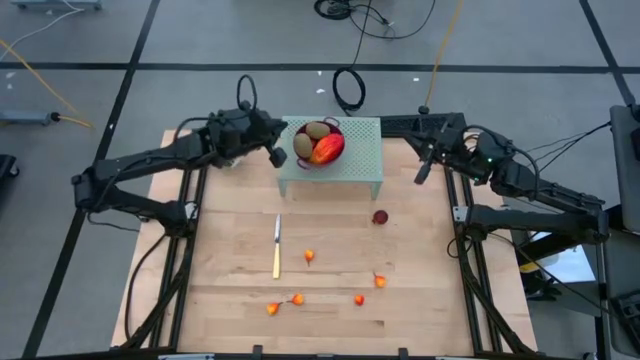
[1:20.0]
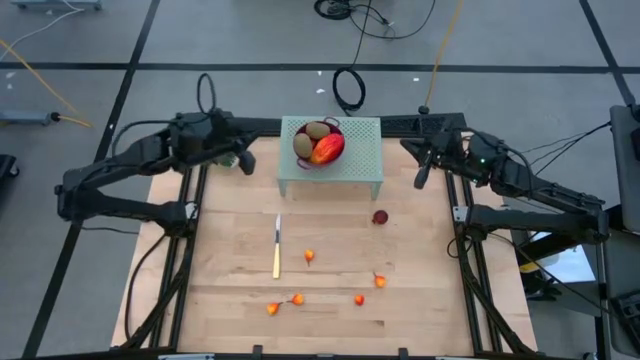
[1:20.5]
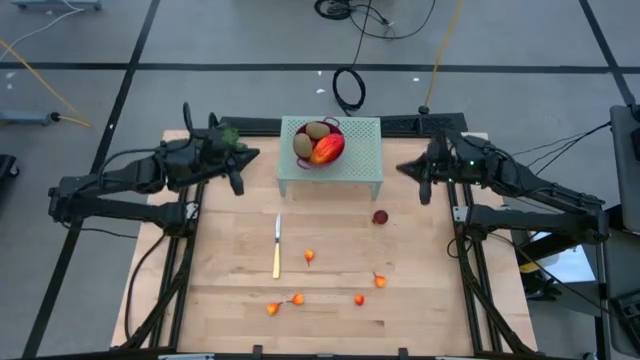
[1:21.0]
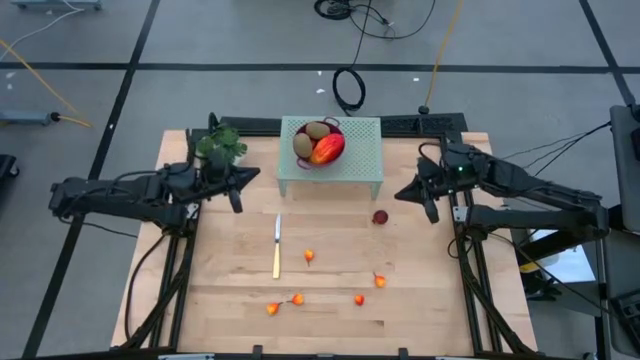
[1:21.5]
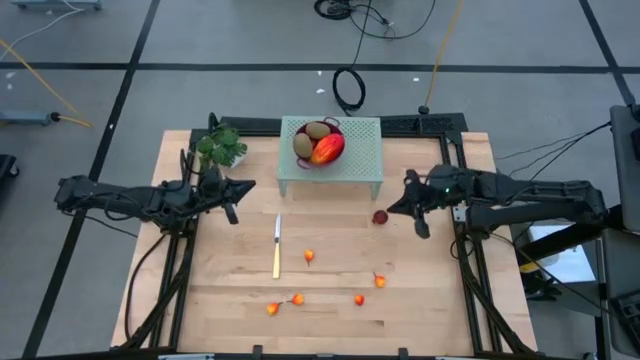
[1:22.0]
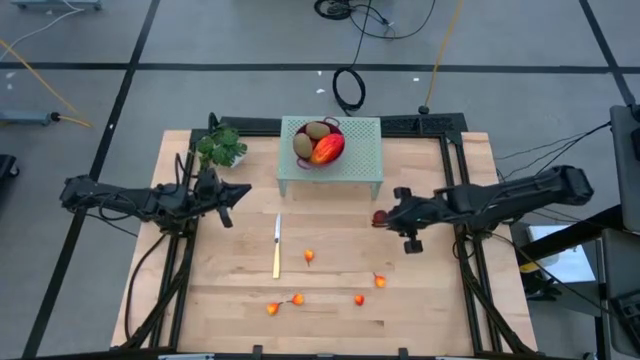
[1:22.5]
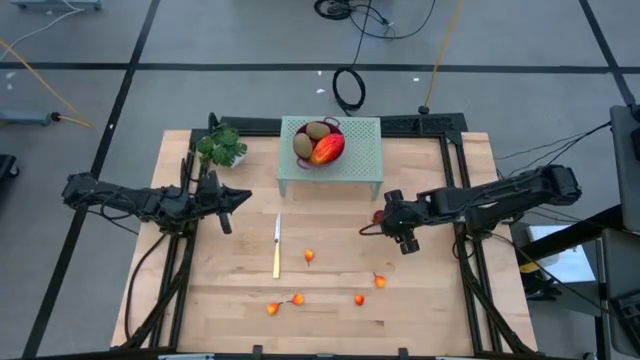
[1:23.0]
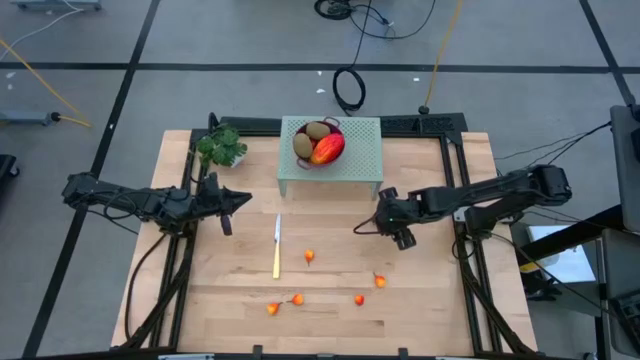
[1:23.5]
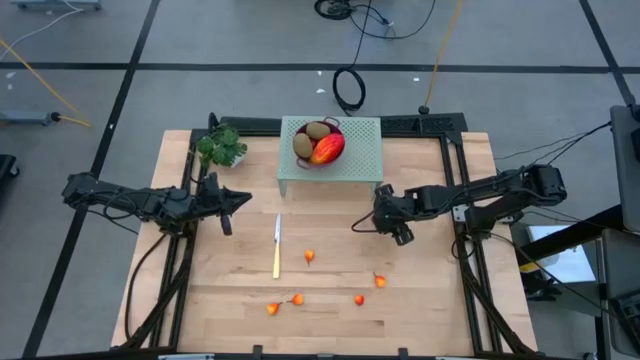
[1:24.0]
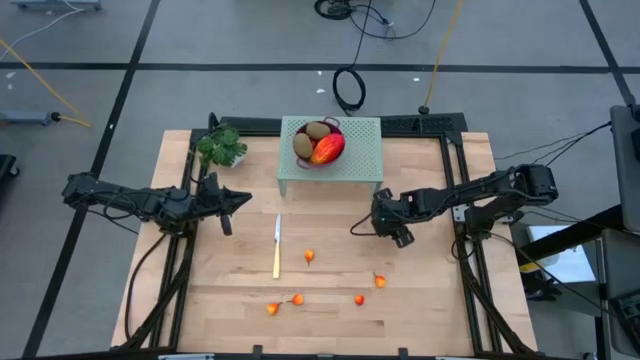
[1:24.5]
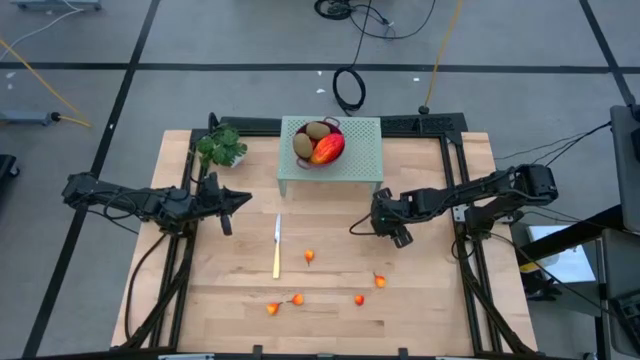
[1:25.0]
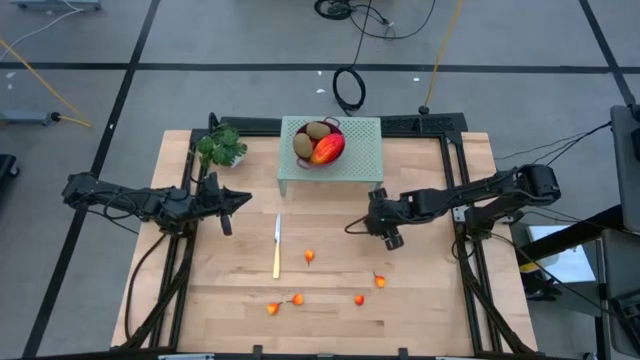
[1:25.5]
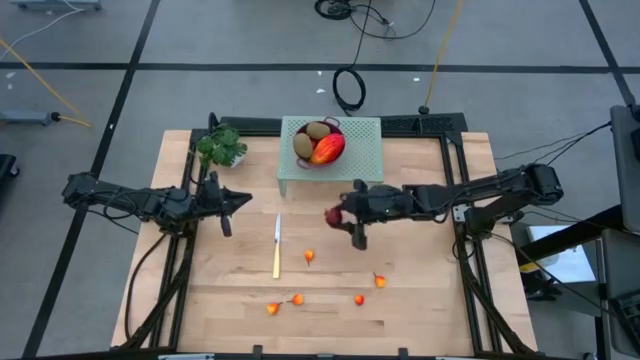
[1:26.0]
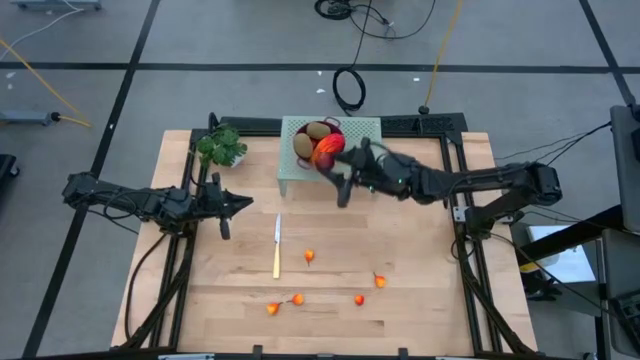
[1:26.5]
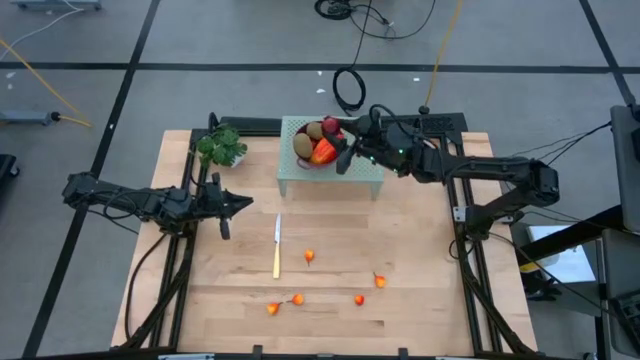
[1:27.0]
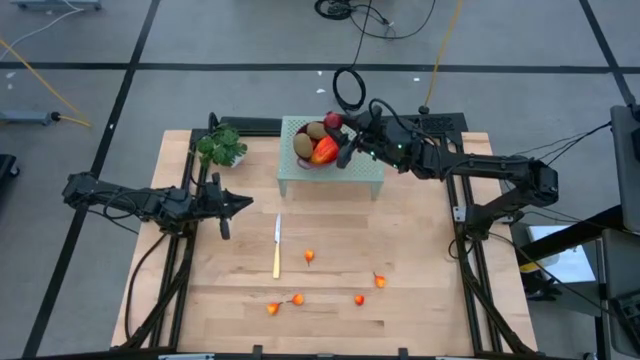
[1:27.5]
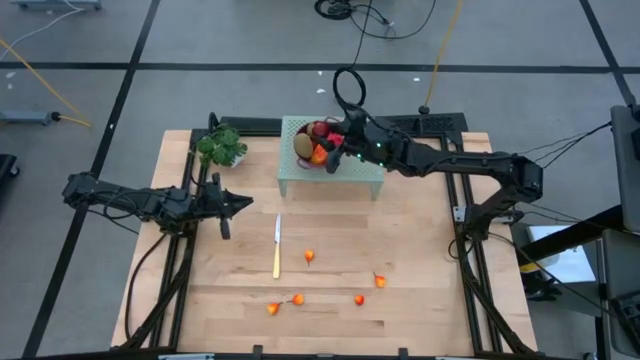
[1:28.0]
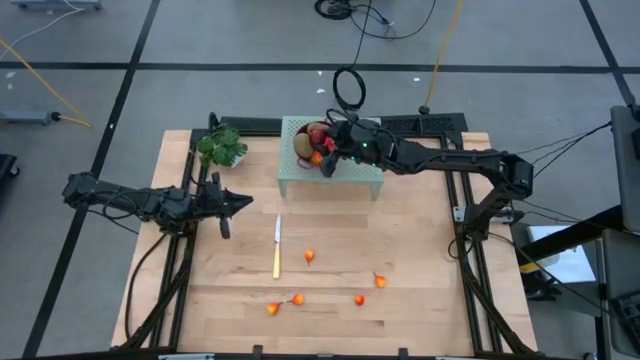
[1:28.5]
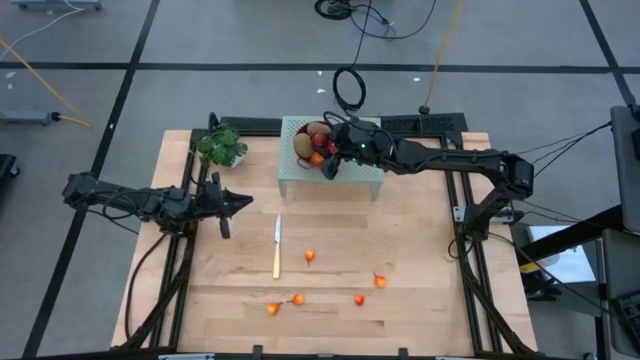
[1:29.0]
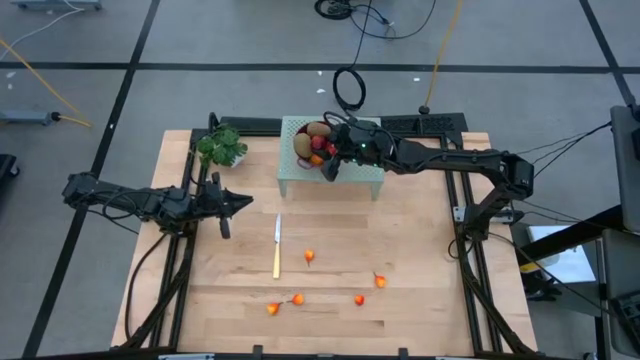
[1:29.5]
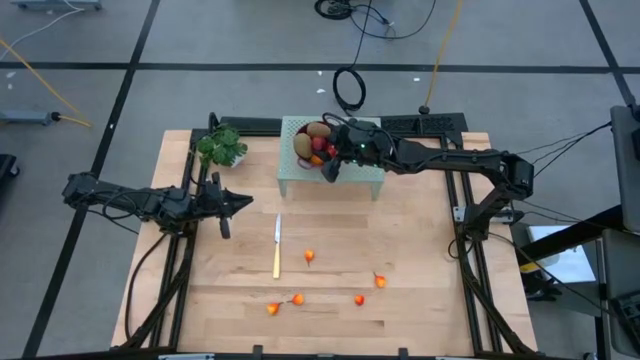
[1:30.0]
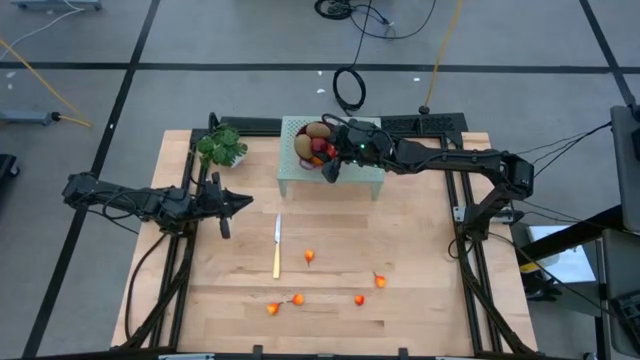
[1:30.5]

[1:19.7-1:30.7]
Task: Pick & Place Fruit
Put the pomegranate into the strainer bowl on the shelf

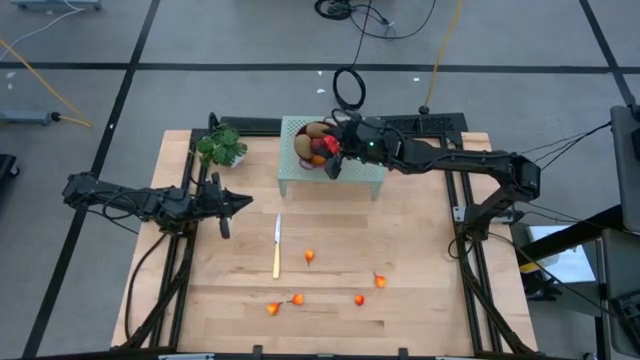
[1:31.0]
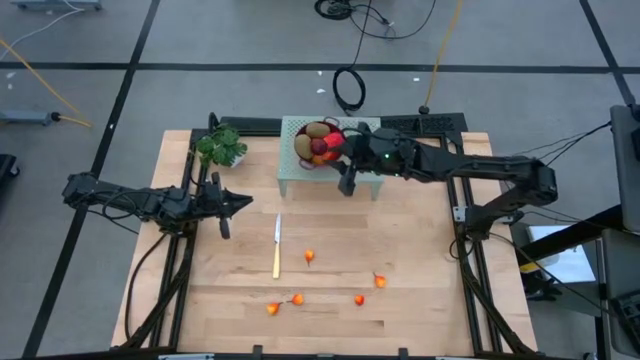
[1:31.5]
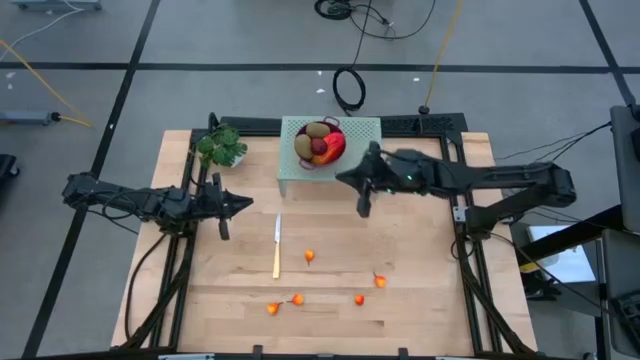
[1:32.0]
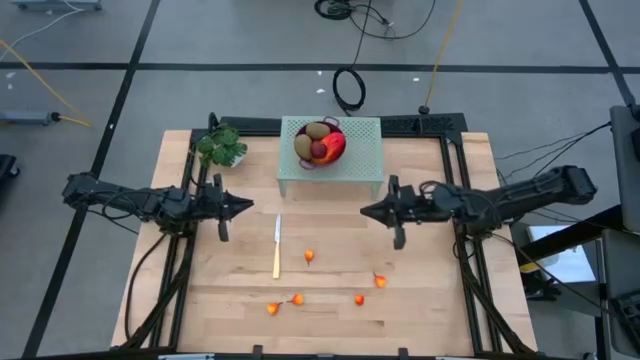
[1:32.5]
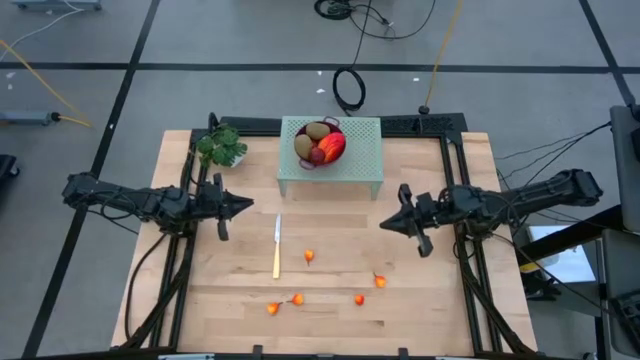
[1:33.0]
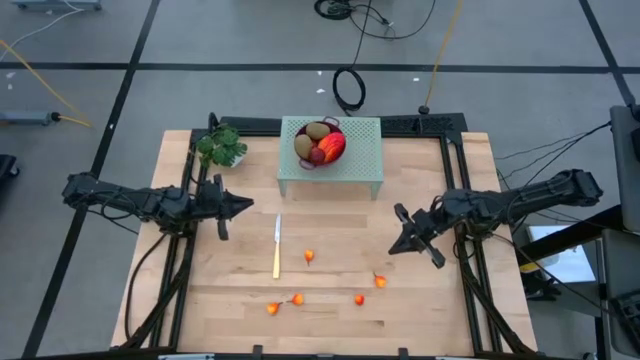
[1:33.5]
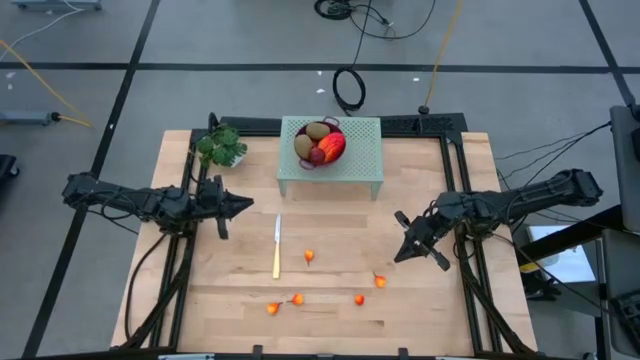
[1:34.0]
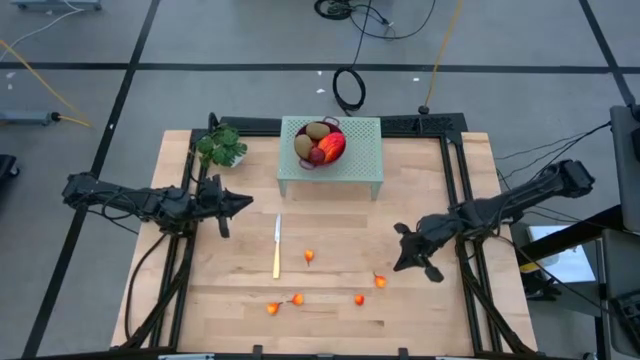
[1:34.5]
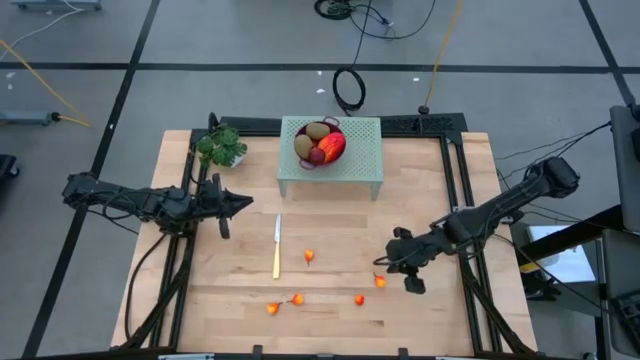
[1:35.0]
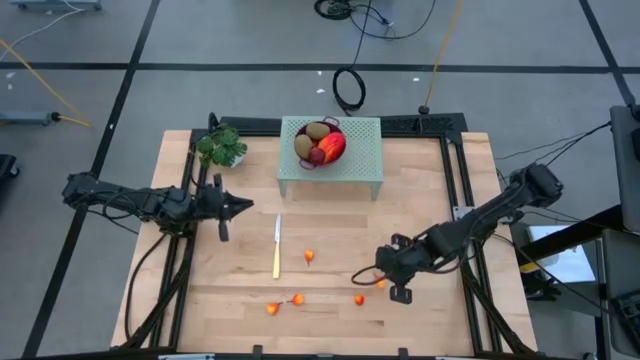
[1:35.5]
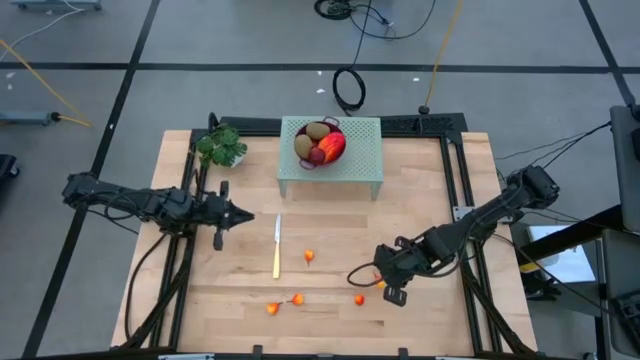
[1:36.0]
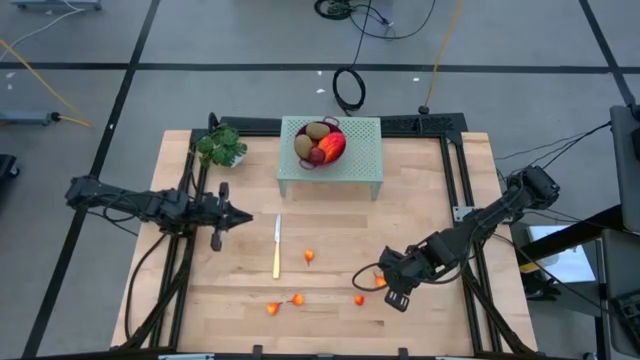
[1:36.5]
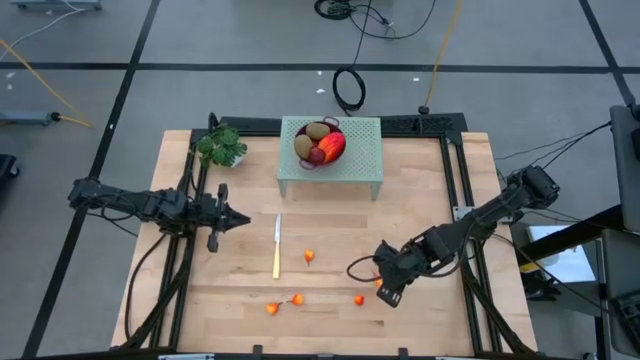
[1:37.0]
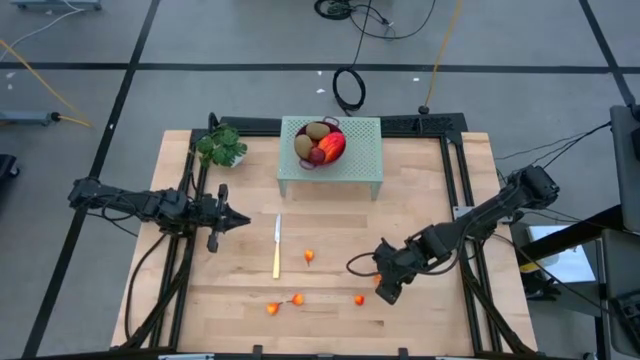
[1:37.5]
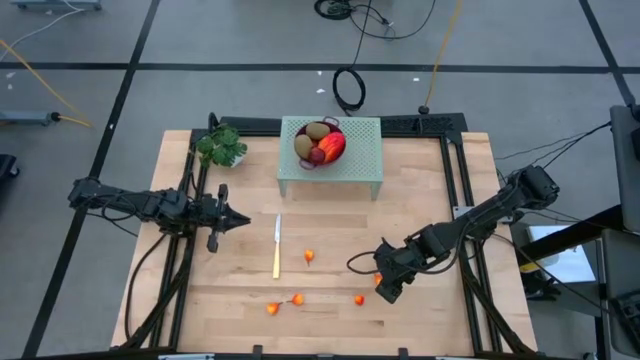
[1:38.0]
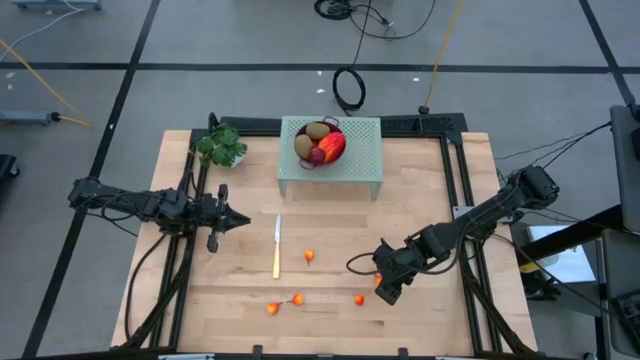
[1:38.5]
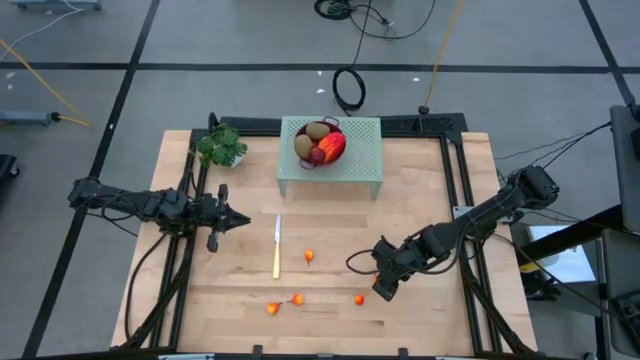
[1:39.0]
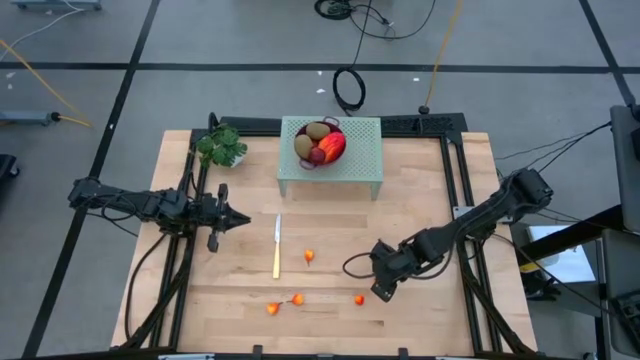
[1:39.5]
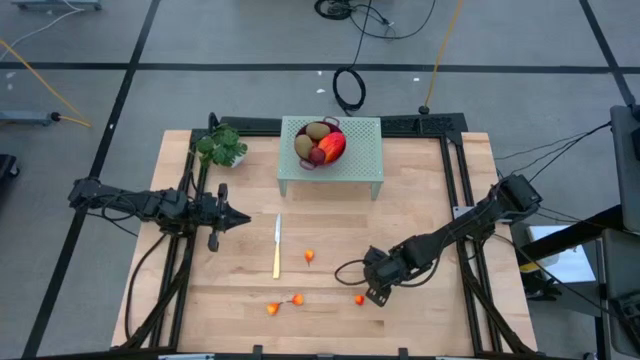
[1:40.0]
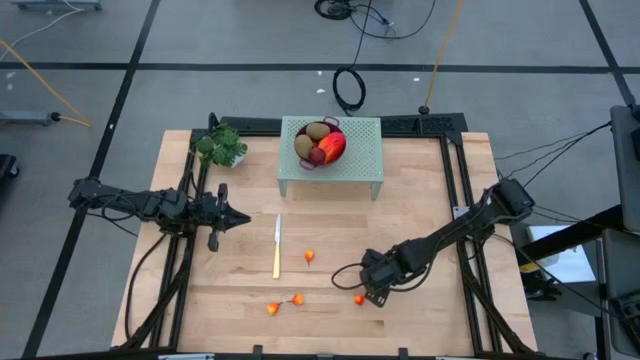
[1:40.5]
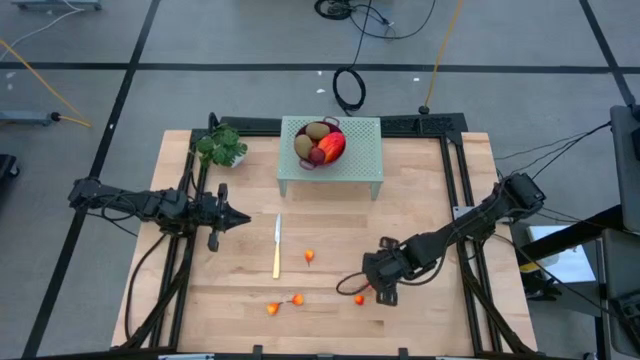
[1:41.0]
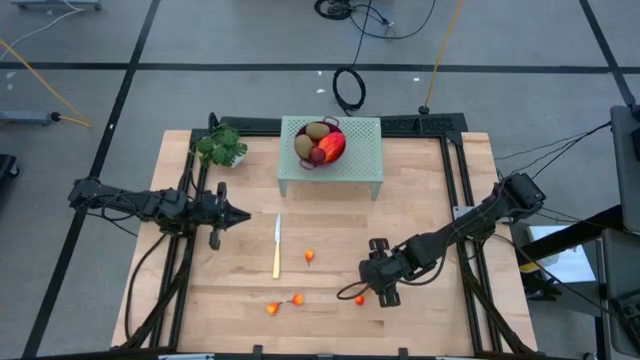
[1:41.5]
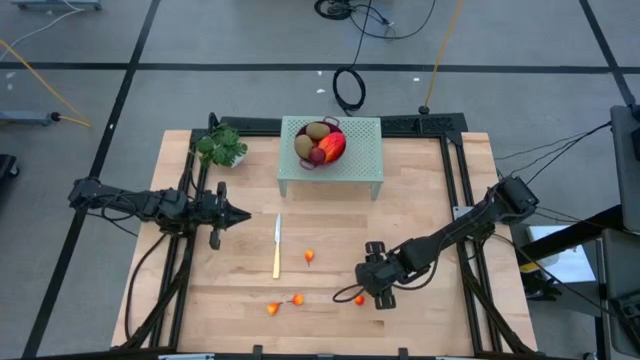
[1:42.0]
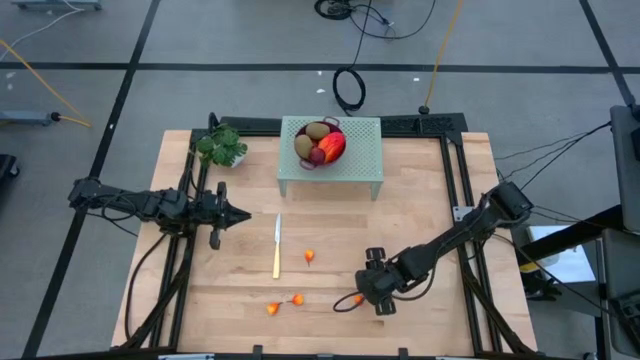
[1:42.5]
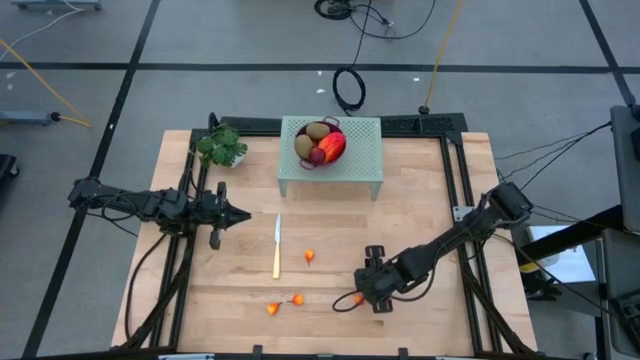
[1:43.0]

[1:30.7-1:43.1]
Put the pear into the strainer bowl on the shelf
